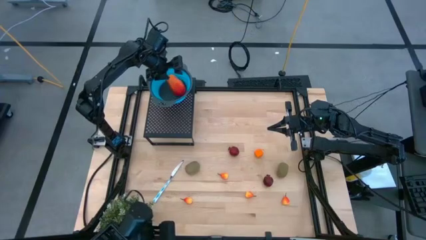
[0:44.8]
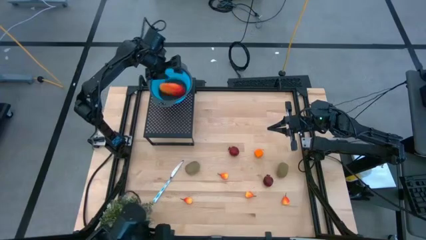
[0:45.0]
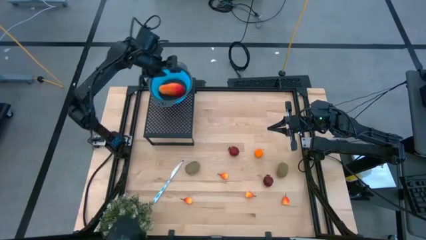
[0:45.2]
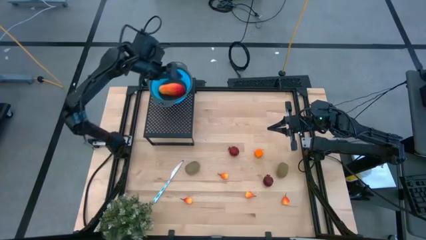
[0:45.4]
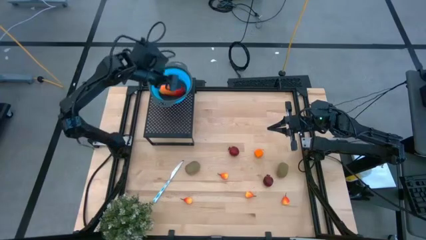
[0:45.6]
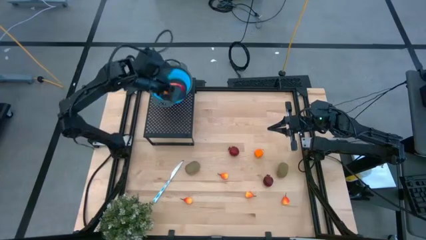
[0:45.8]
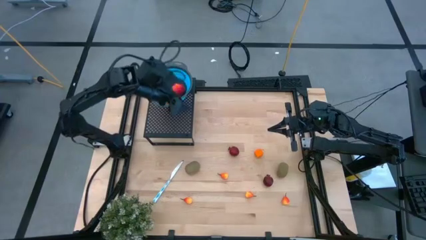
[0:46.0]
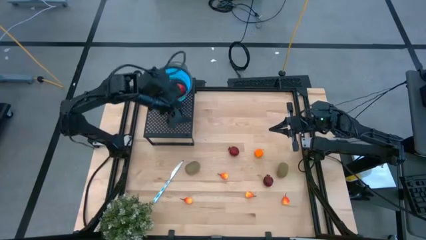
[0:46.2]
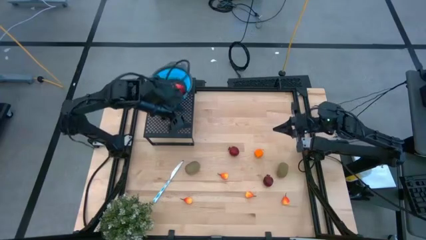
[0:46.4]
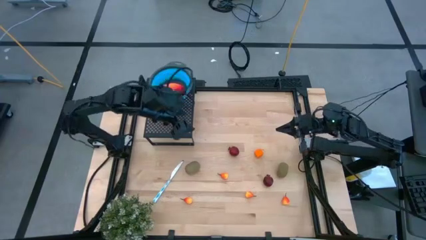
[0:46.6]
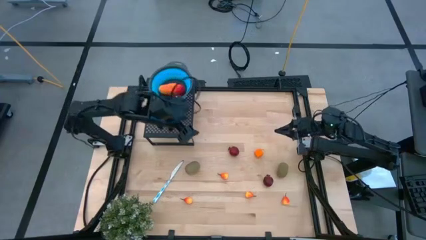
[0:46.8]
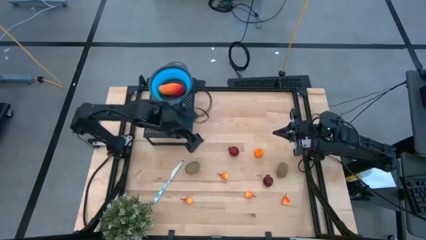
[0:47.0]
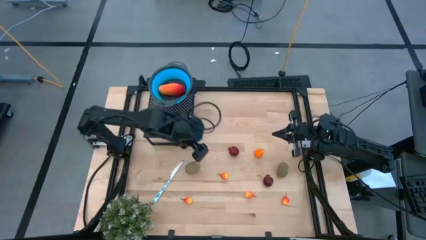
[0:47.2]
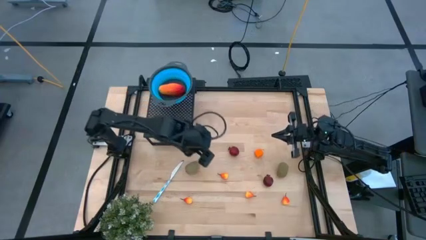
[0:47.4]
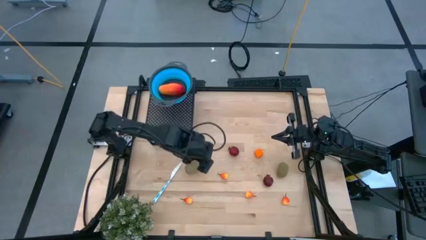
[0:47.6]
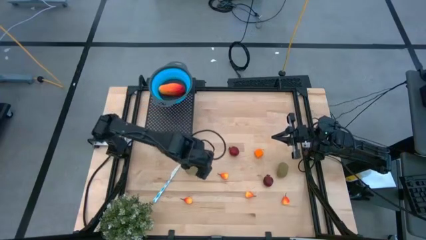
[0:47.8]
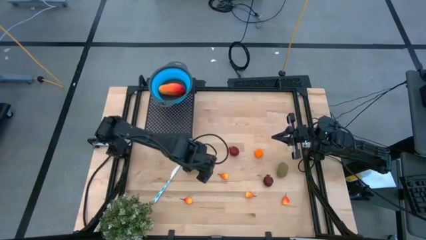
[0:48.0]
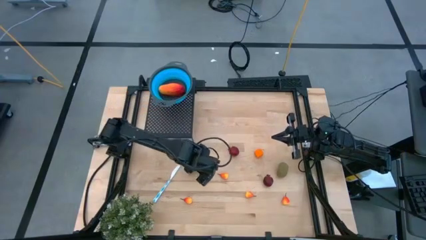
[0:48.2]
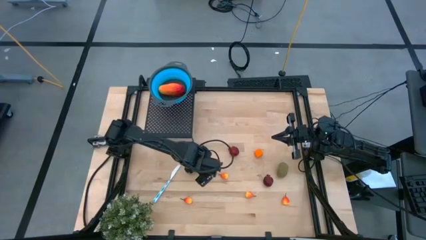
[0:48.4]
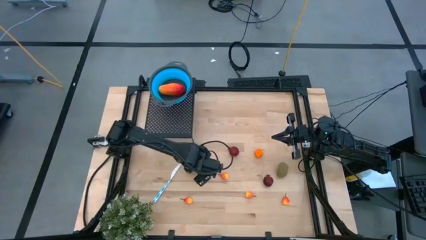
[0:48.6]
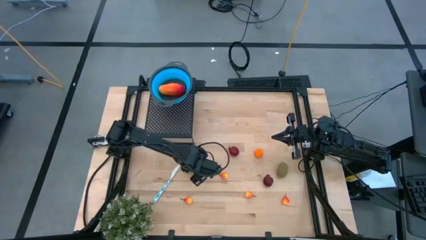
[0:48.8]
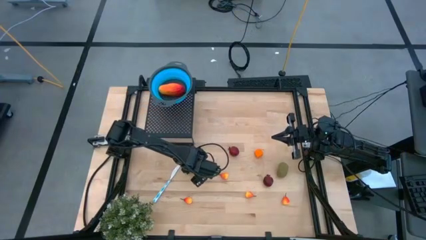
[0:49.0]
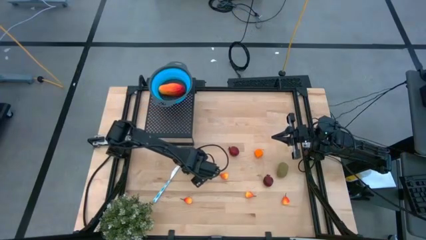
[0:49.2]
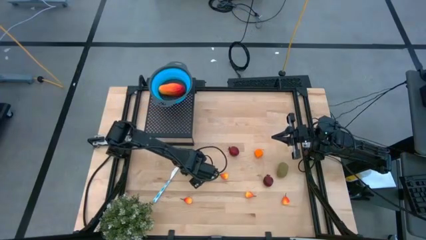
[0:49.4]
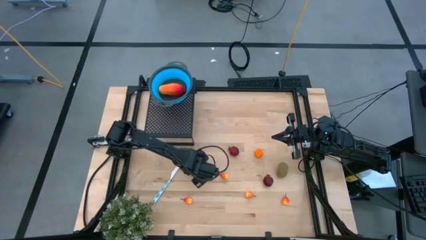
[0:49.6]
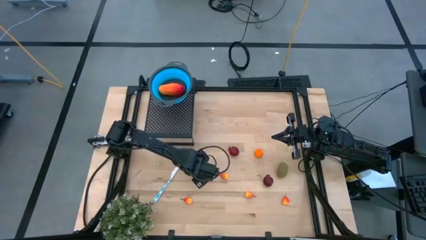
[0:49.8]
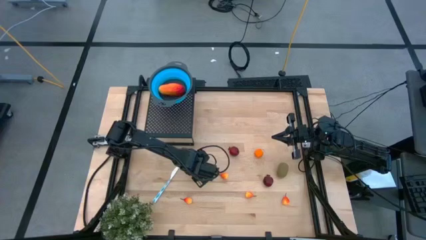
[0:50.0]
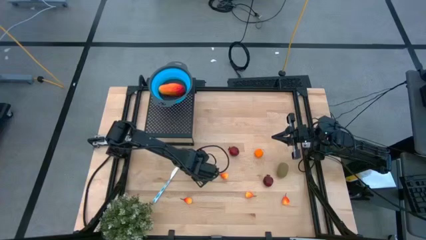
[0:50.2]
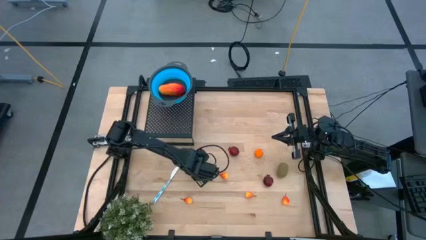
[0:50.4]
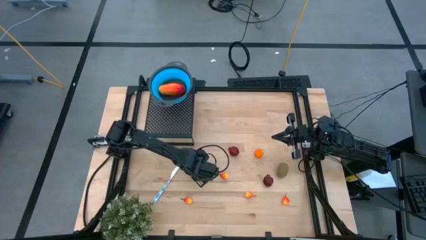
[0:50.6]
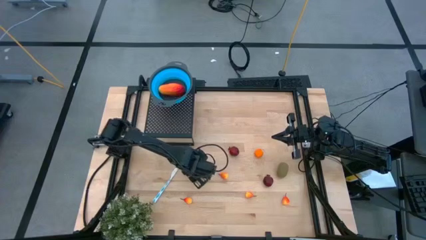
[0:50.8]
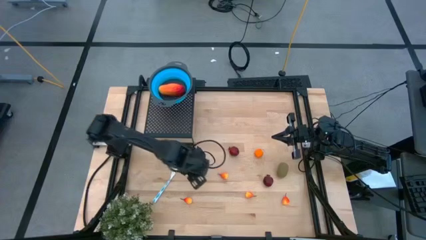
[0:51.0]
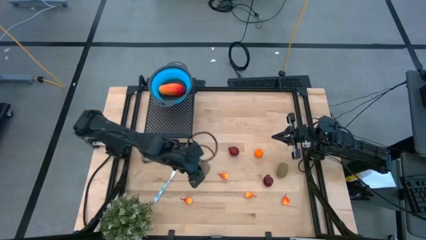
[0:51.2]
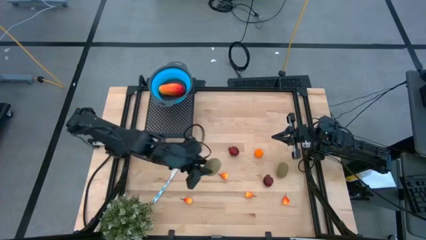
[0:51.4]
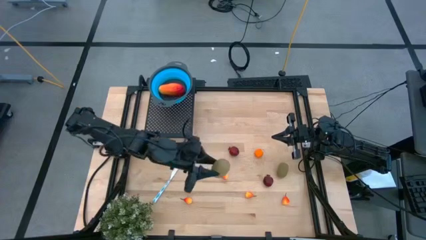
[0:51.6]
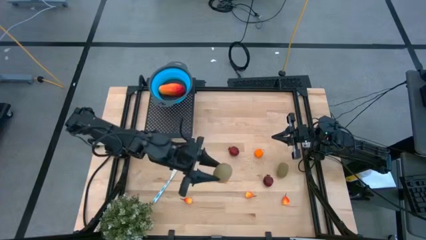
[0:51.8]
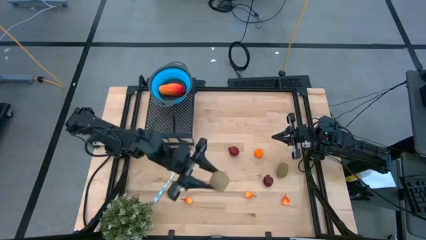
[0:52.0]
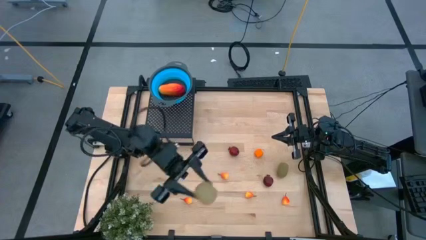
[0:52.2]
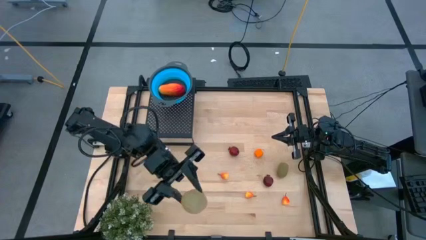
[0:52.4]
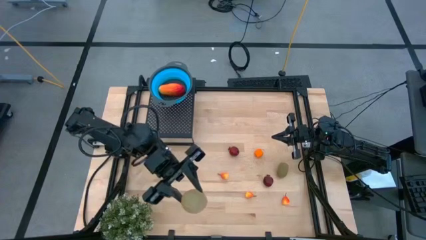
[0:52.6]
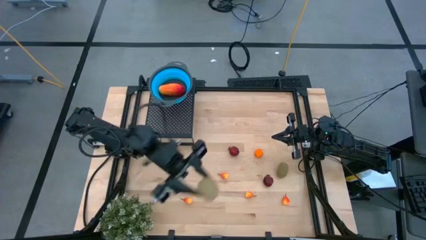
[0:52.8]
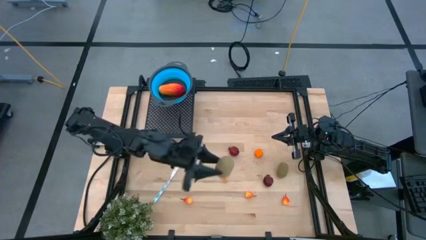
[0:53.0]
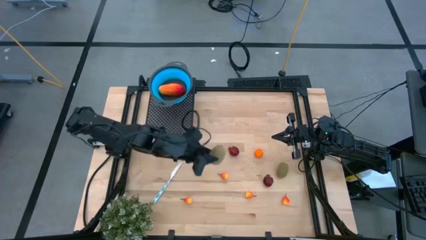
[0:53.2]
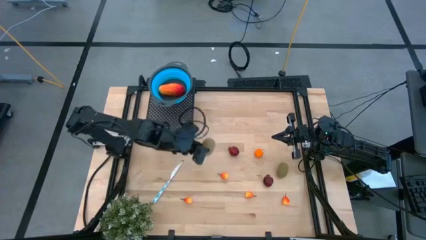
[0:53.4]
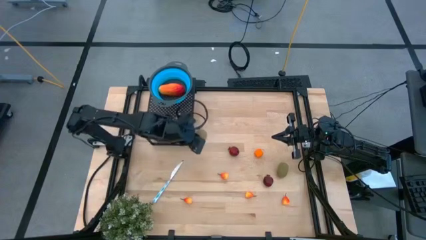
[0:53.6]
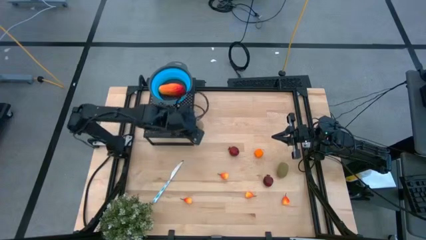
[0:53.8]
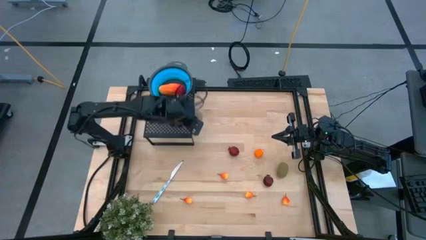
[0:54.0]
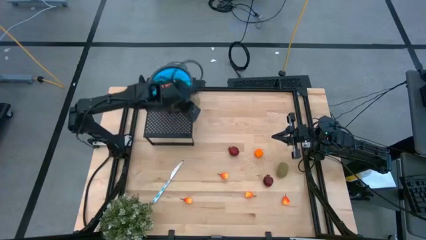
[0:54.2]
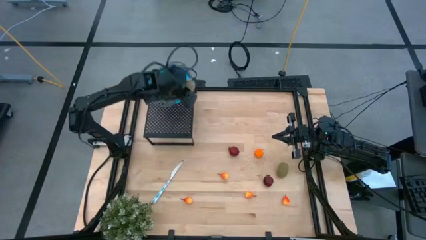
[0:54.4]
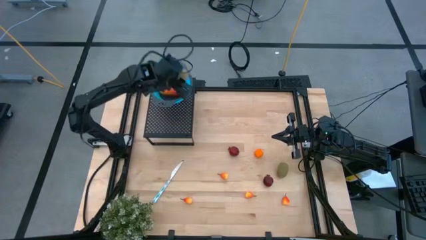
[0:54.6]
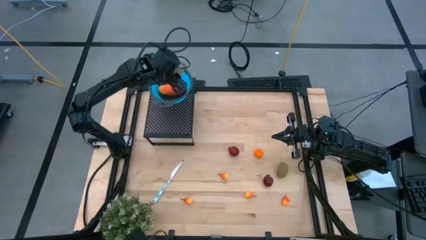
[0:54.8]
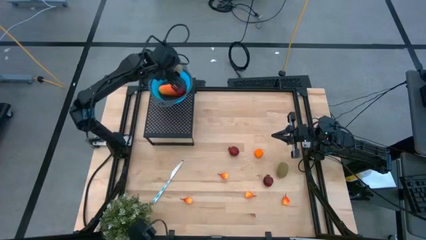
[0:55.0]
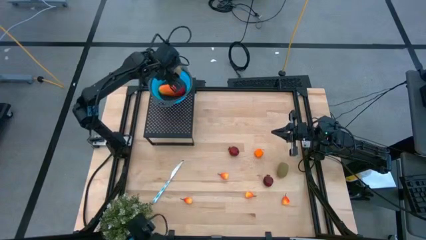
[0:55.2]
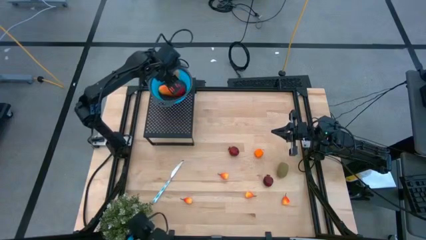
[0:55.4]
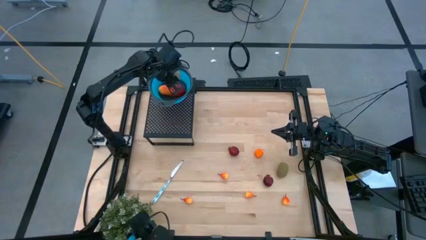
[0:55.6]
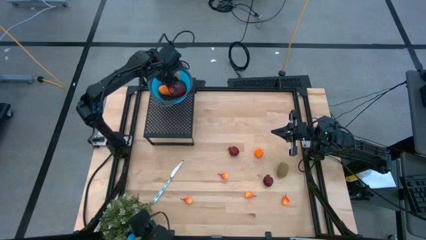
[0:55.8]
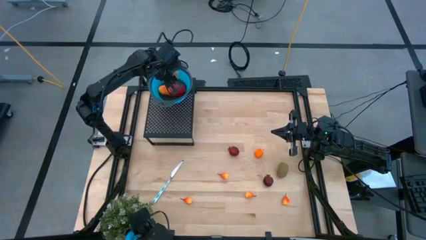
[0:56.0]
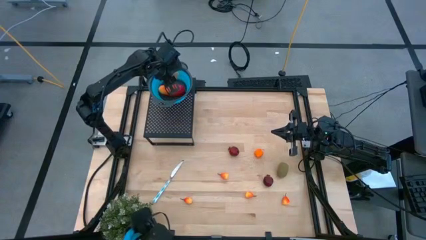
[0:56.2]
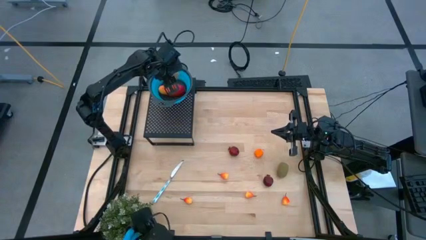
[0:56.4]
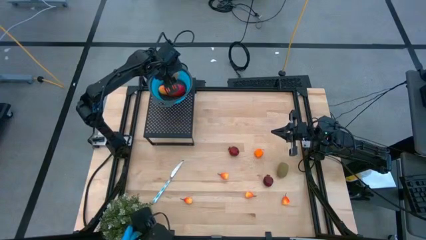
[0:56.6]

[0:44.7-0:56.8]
Task: Pick & Place Fruit
Put the brown kiwi into the blue strainer bowl on the shelf

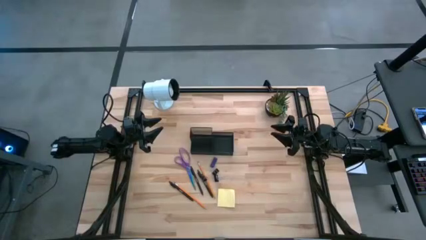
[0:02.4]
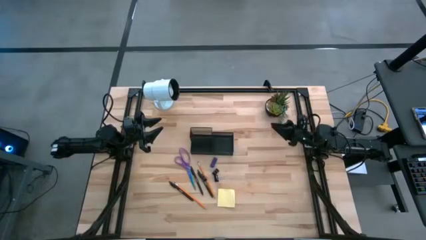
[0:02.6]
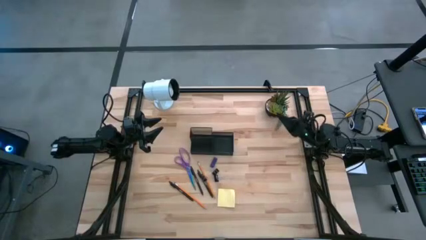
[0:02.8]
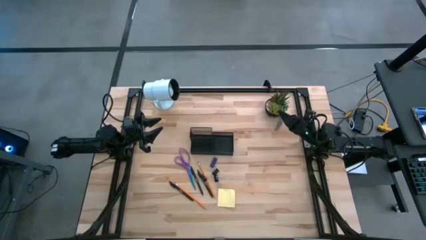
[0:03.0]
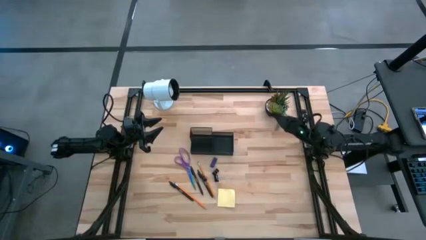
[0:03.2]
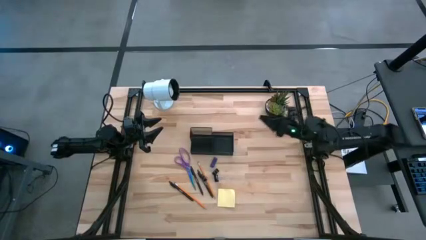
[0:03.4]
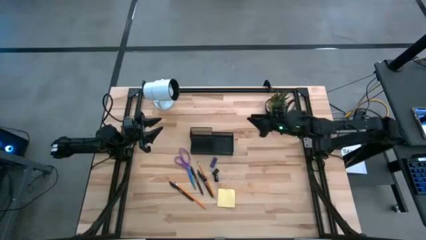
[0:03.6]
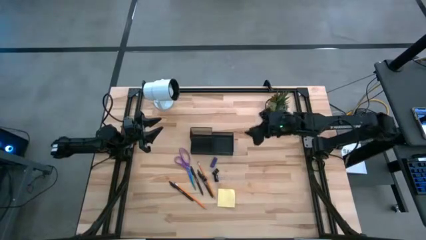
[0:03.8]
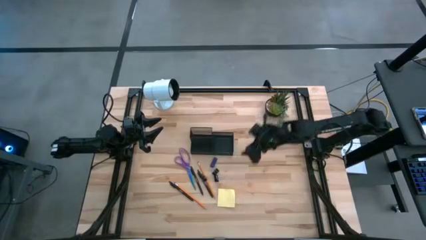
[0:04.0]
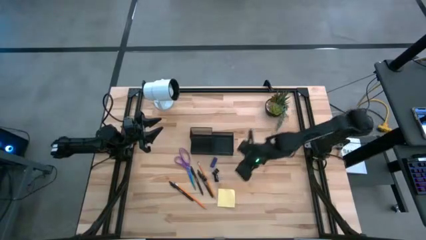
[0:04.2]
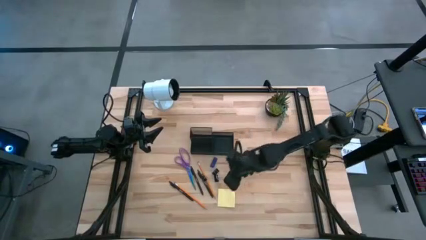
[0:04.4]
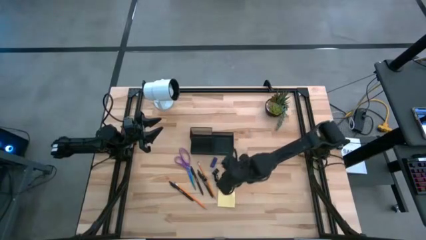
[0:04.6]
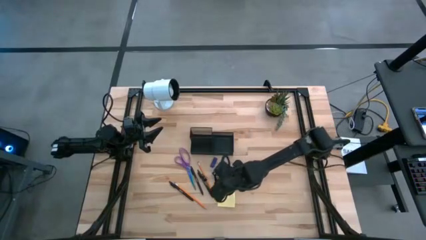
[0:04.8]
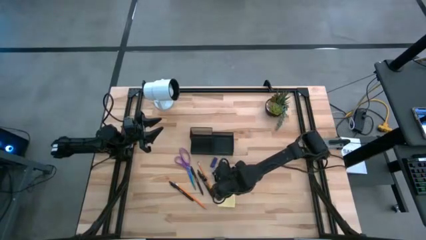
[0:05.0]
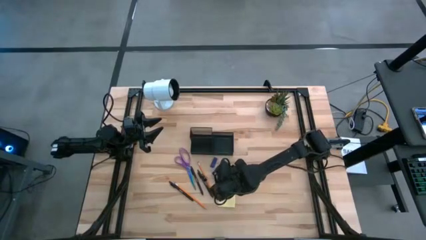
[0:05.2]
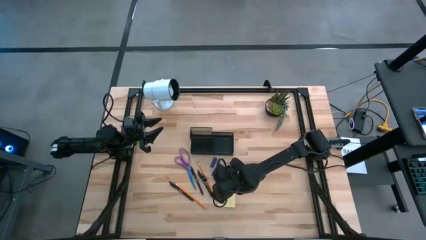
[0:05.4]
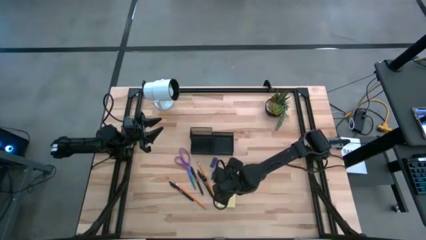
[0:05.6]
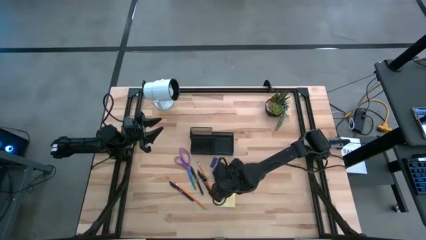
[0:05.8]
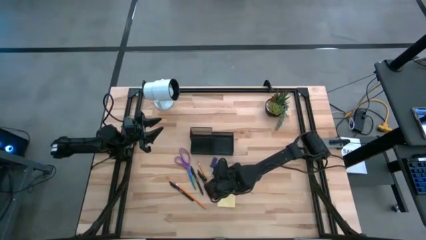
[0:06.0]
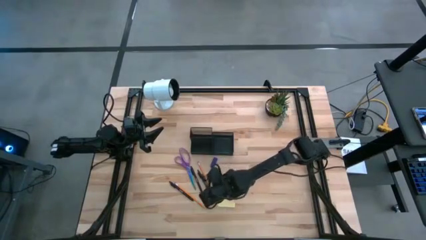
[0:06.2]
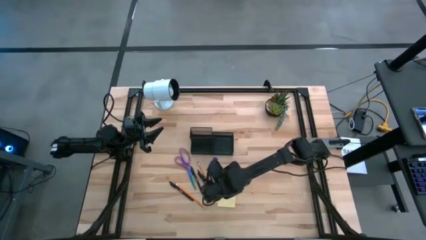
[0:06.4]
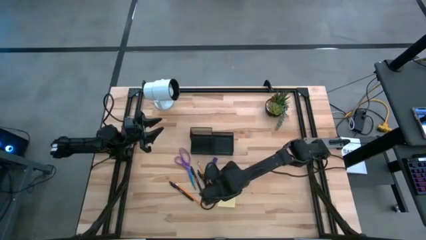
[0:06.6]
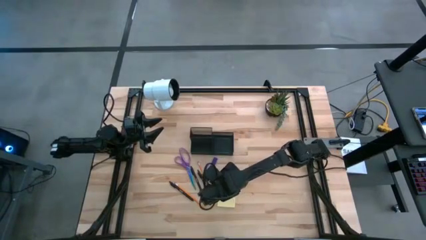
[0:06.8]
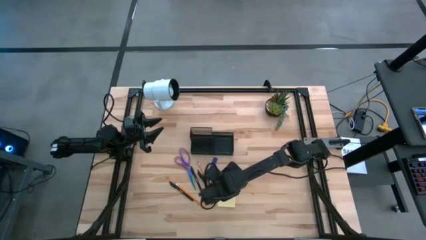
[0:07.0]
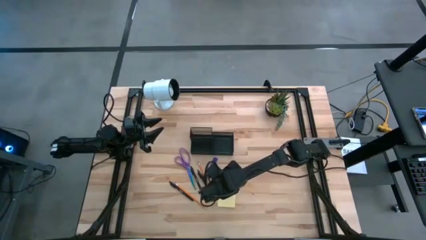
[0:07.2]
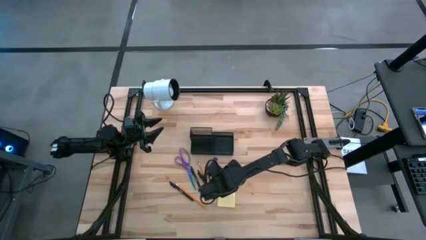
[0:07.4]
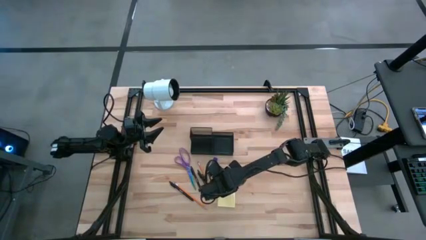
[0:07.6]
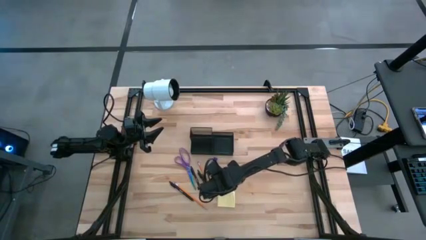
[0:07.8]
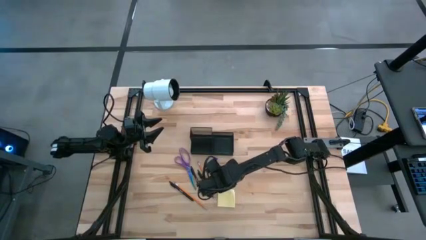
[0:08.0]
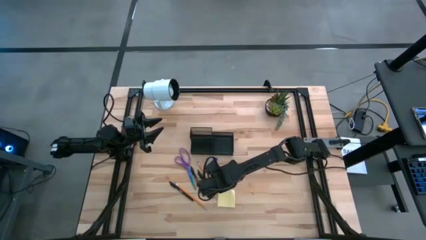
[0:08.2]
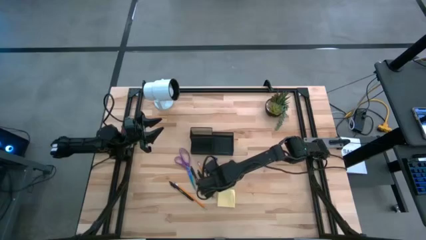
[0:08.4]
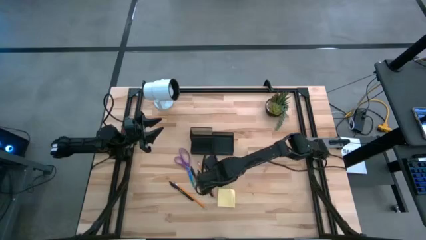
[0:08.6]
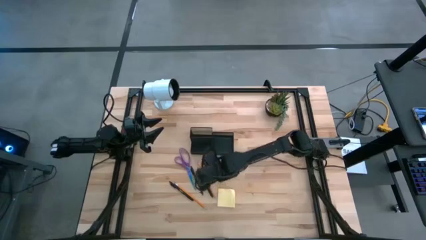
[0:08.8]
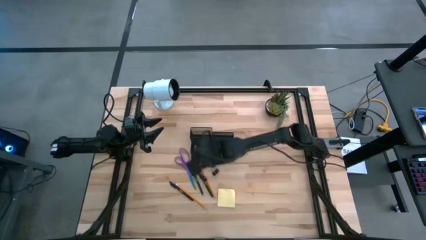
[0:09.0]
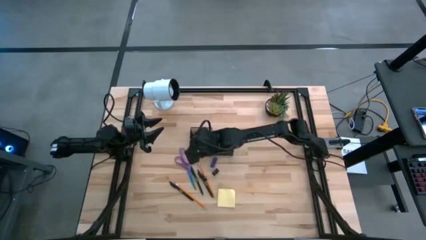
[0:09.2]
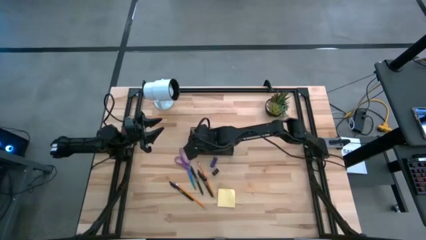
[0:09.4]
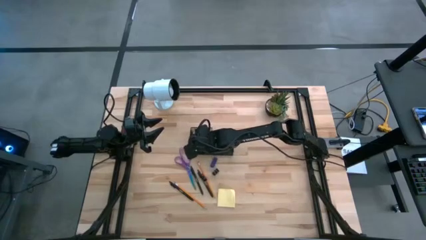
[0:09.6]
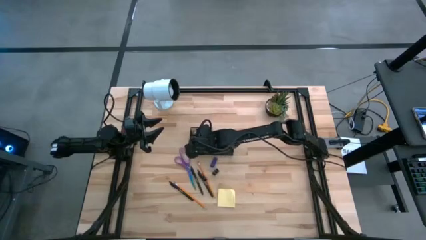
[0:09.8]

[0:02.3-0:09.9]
Task: Pick and place office supplies into organizer
Put the bottom right black binder clip into the black desk organizer
